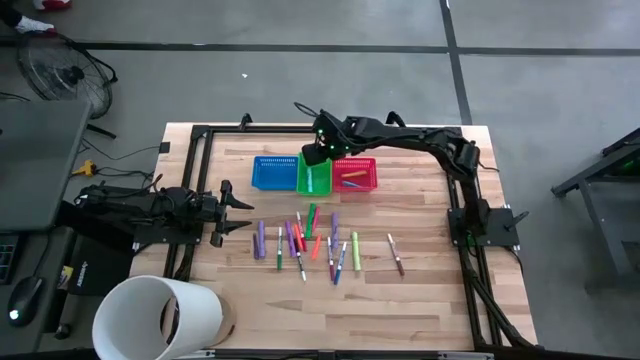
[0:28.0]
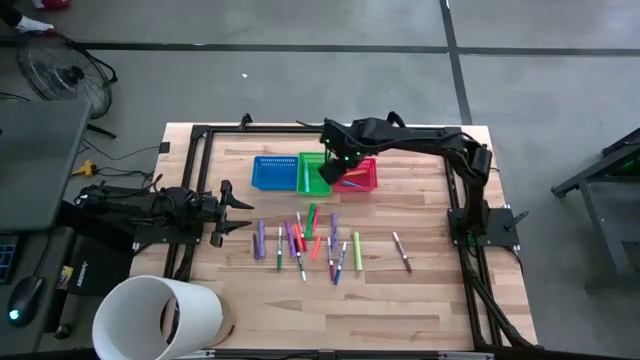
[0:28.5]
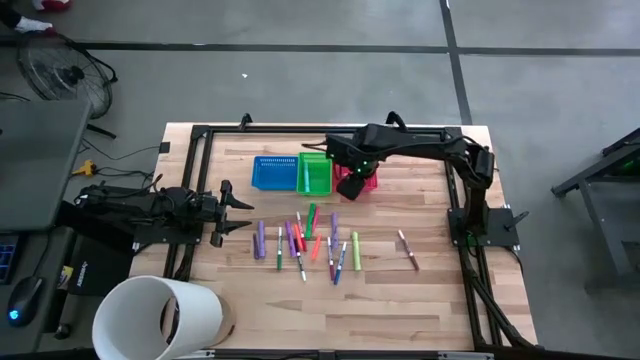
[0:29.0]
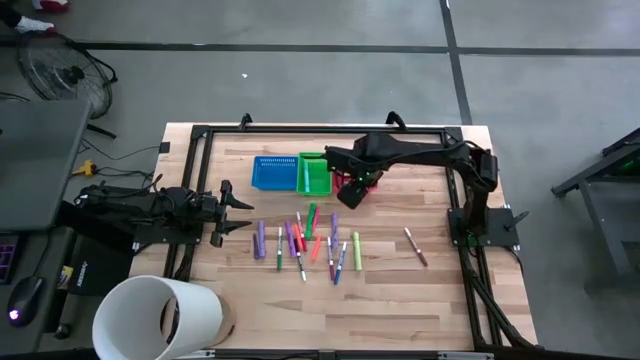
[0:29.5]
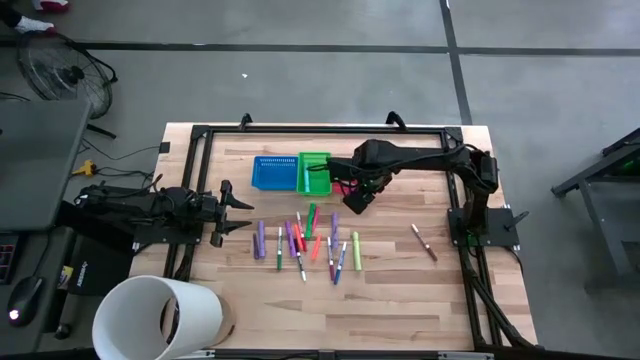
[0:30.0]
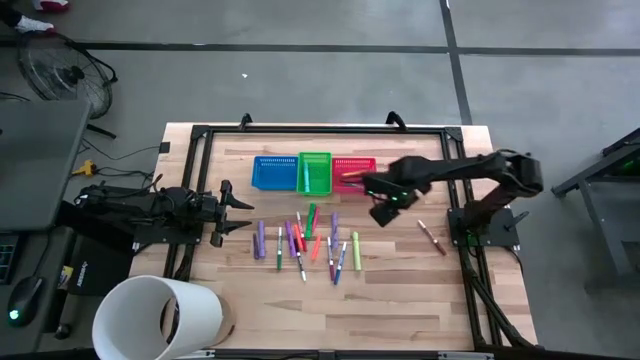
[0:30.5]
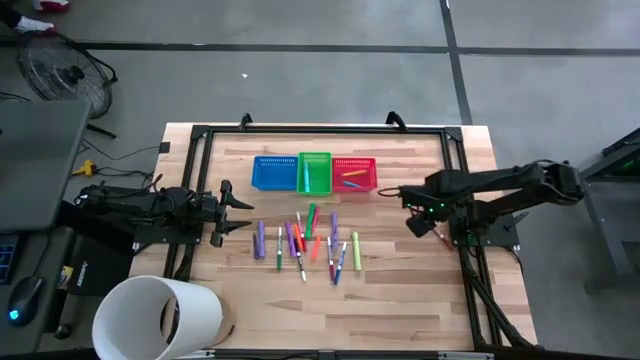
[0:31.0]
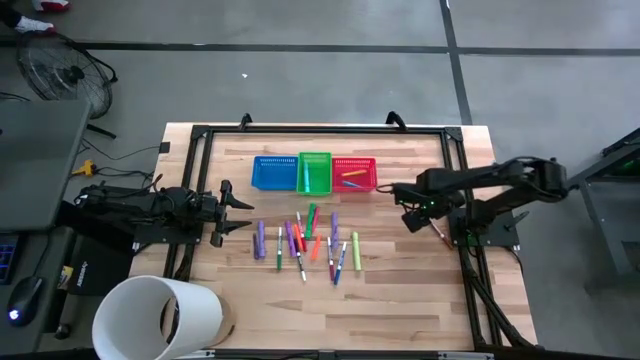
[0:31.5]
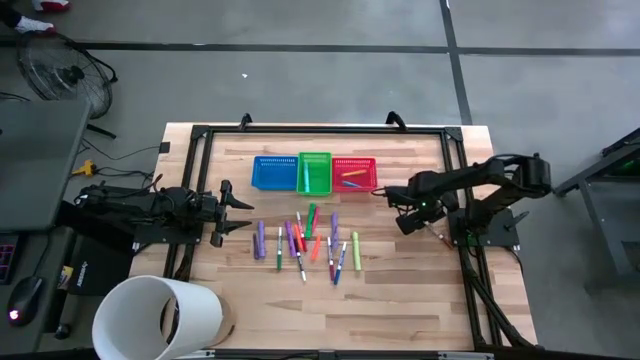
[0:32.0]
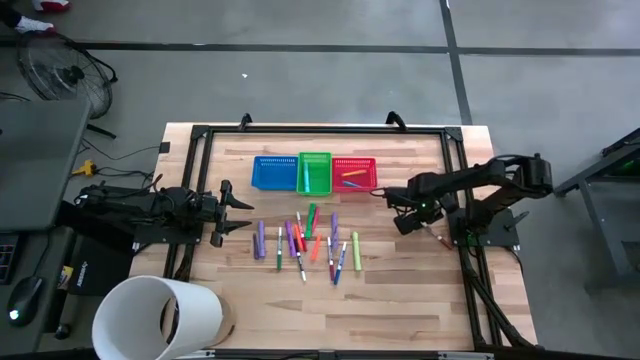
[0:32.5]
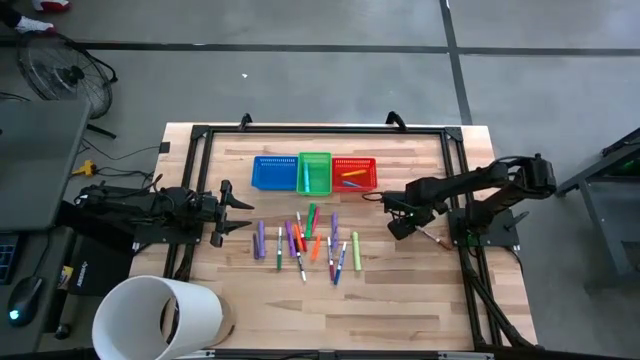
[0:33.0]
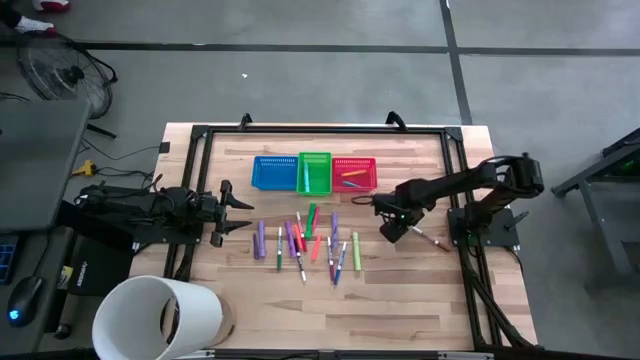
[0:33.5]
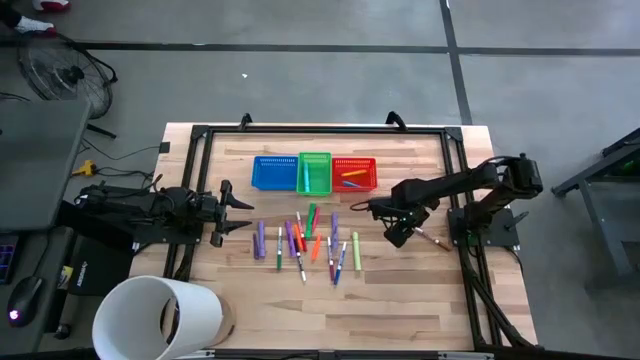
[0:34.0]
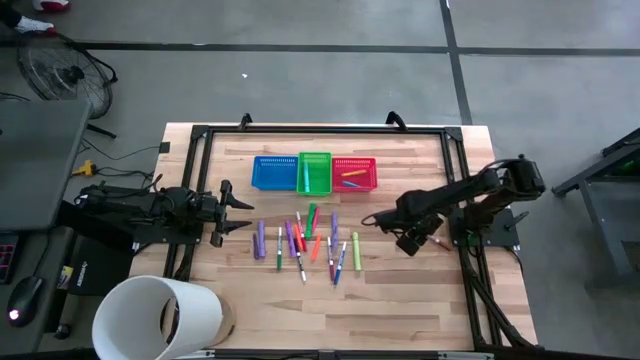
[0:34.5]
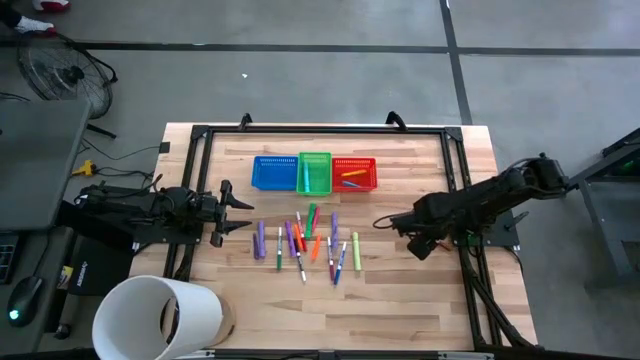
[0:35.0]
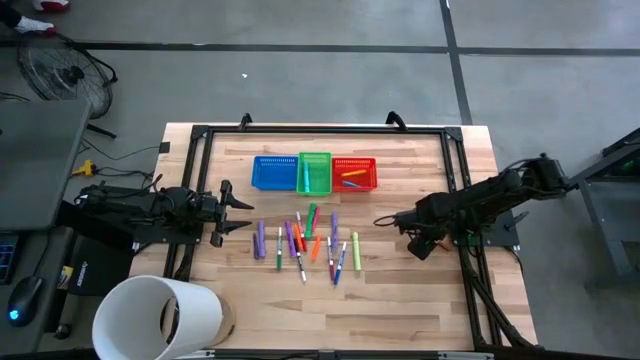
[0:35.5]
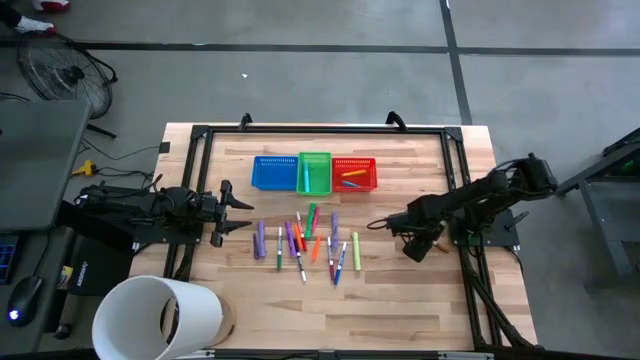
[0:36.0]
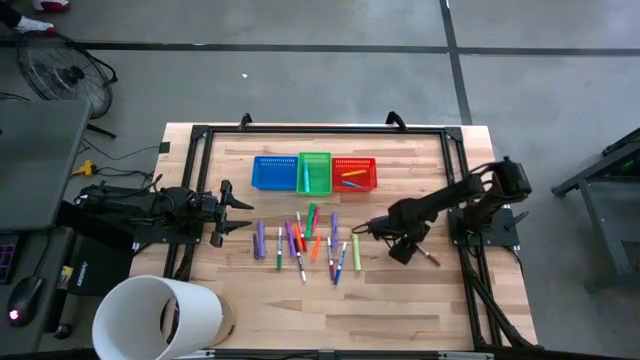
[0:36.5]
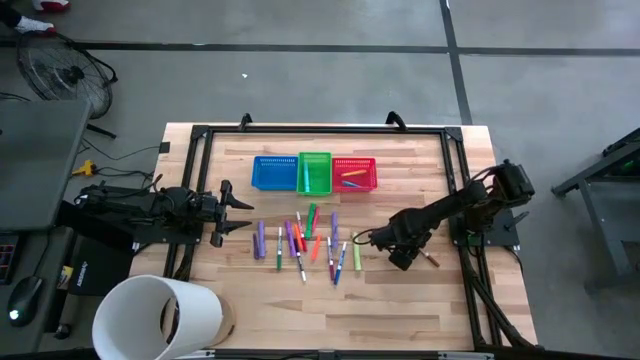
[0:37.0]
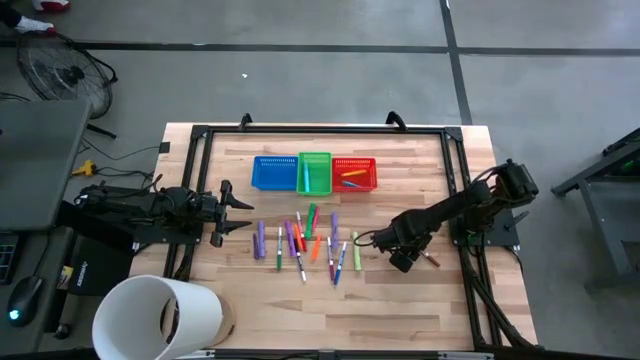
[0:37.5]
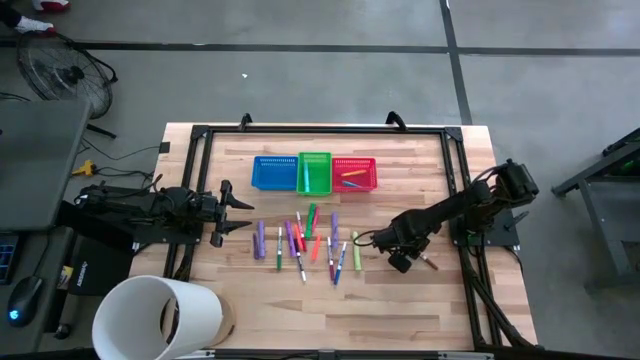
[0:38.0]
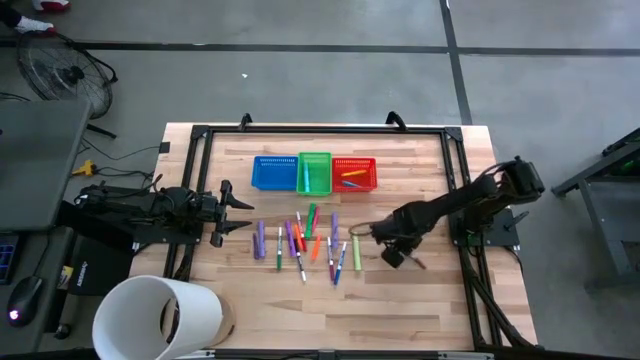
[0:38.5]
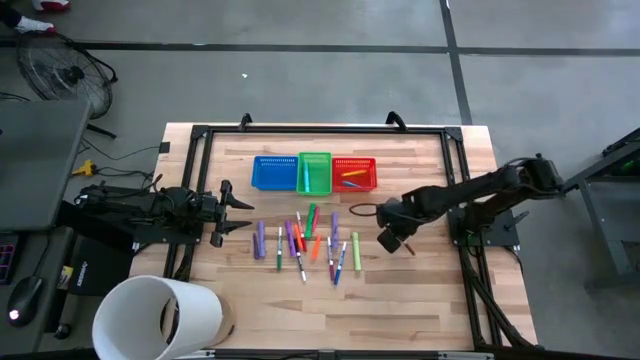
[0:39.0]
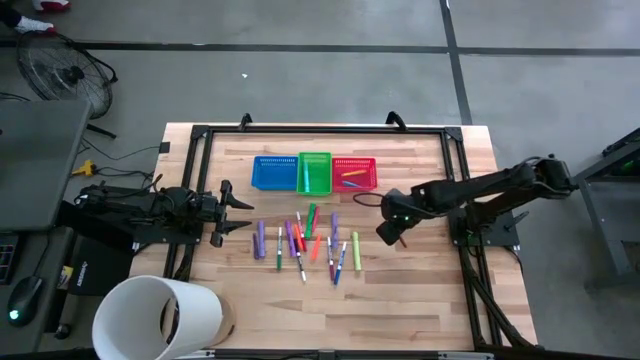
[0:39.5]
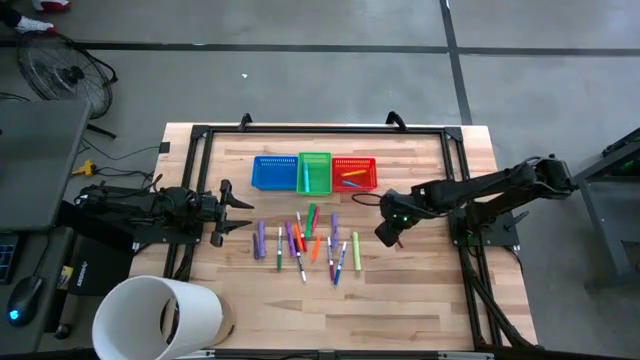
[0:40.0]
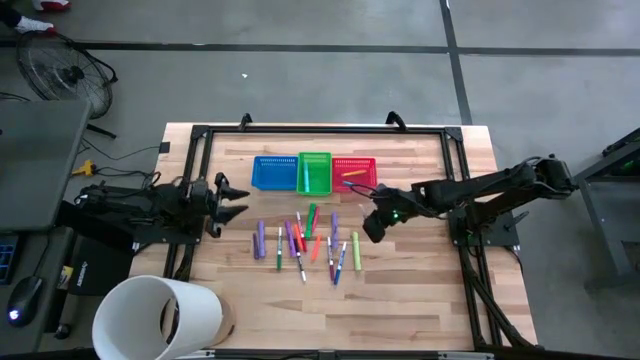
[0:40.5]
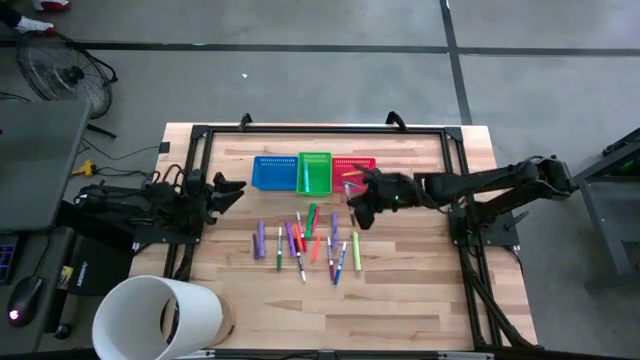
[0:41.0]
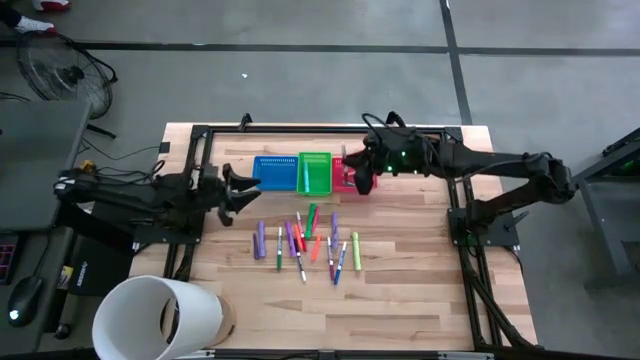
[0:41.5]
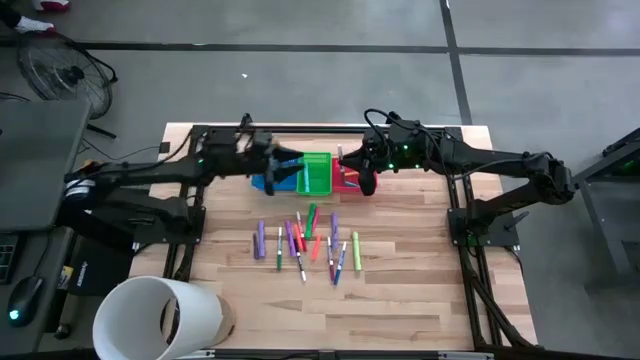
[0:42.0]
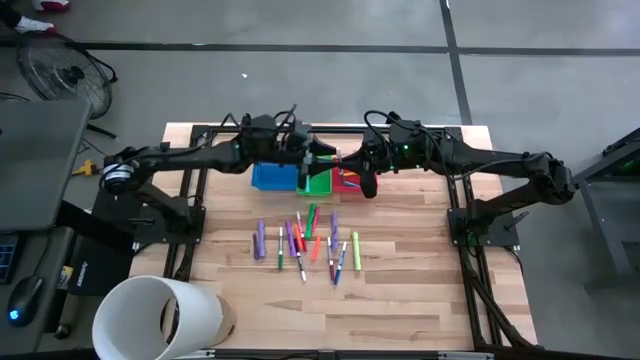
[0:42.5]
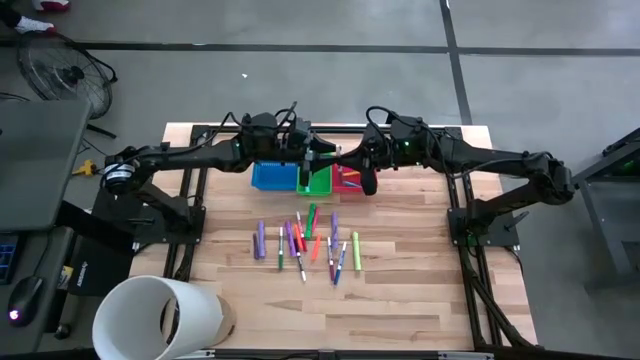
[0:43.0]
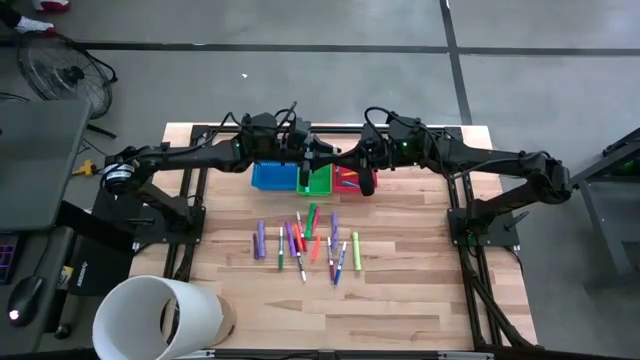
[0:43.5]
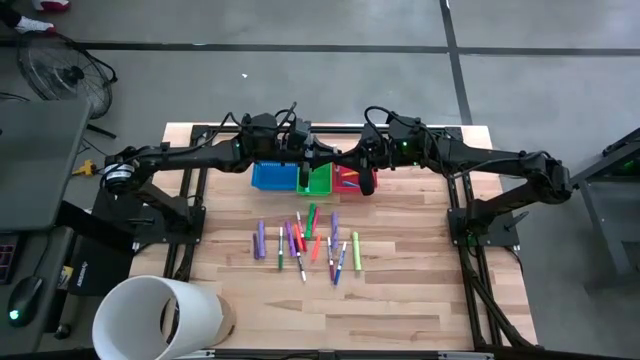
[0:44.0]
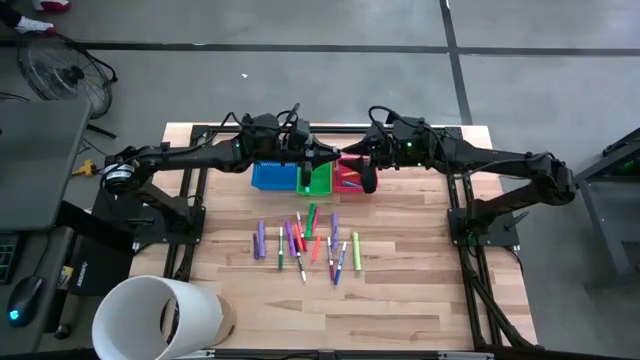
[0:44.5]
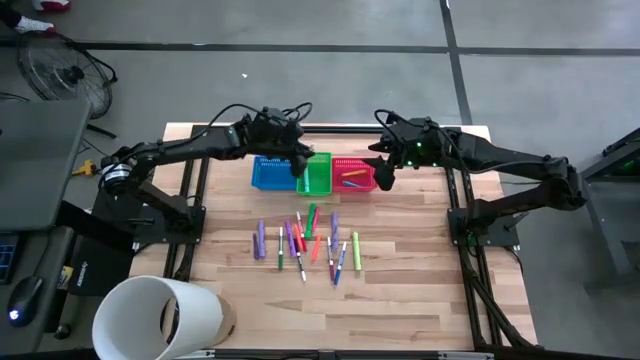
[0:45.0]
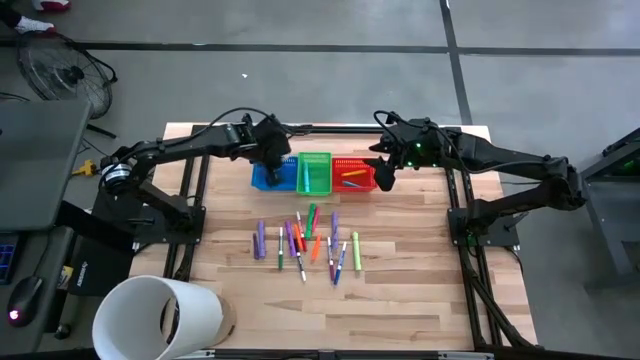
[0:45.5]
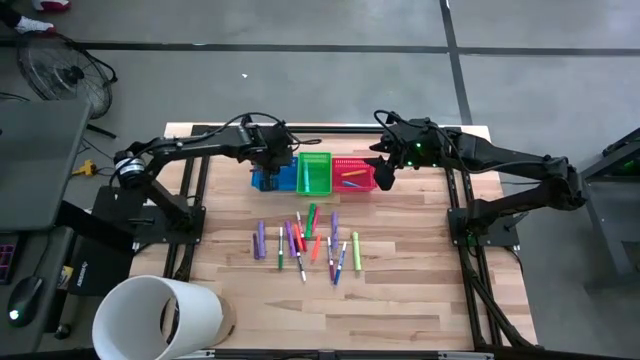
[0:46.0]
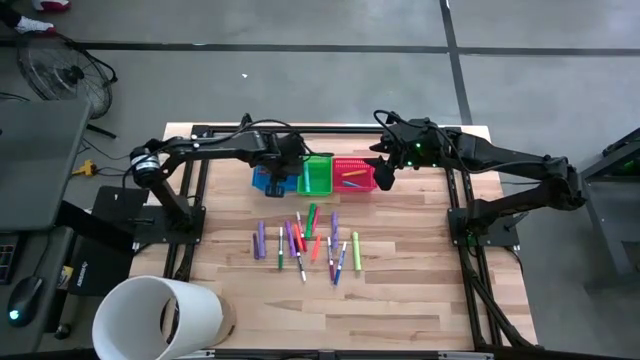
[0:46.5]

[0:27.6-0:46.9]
Task: Pick & Place Markers
Put the brown marker into the blue bin
